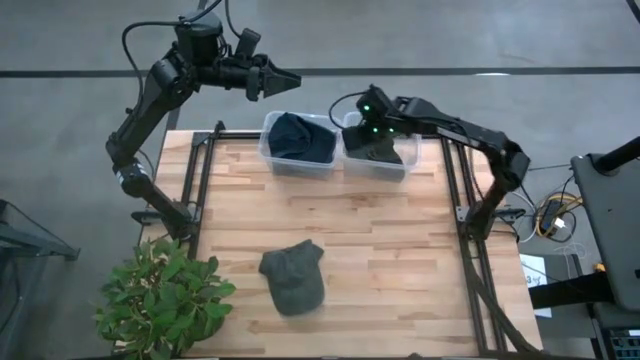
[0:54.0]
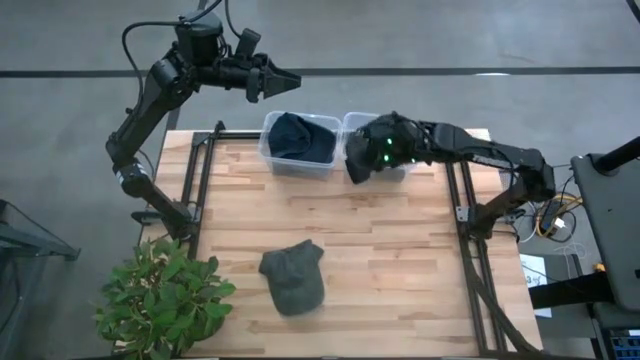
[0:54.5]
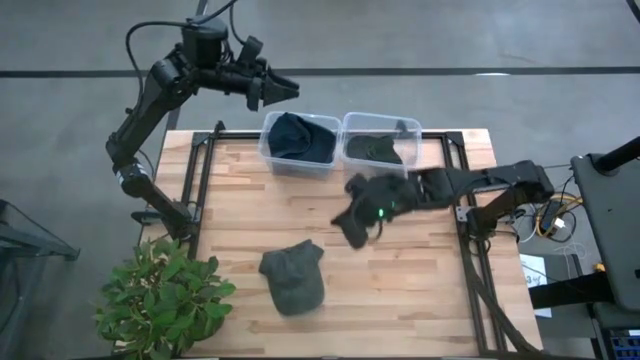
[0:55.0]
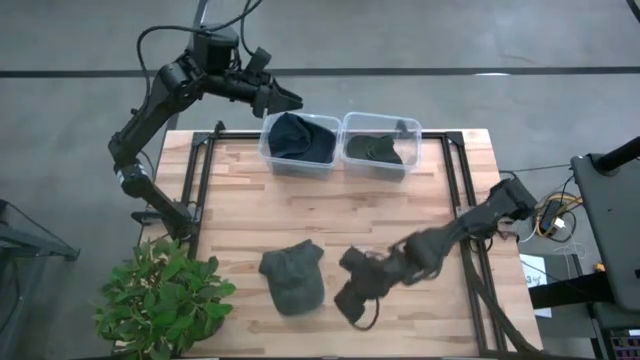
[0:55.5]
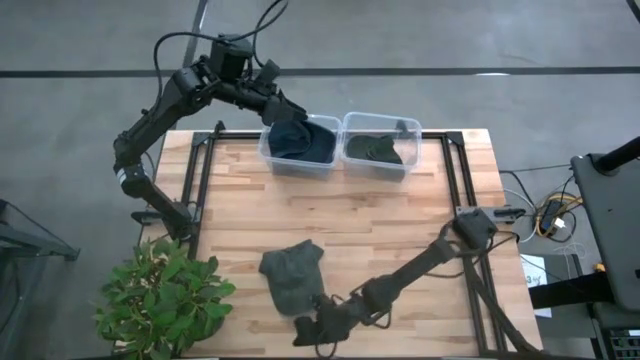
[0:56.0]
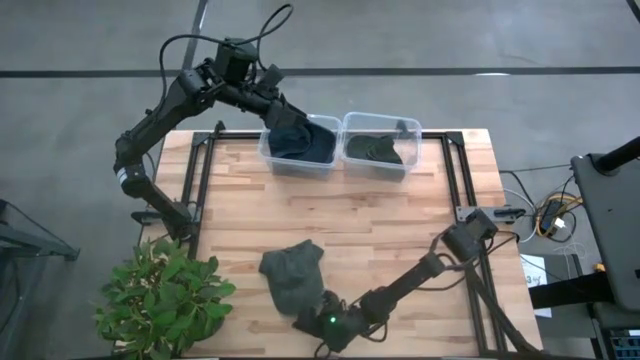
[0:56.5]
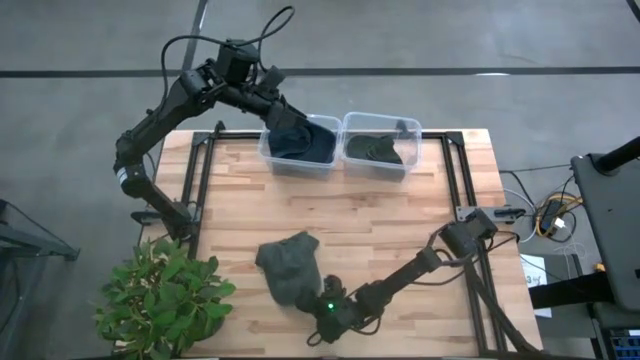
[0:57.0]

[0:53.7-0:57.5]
Task: Pick & Place hat
Put the gray cap into the right transparent bin

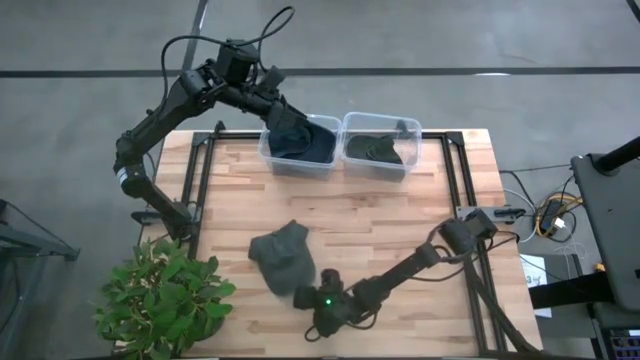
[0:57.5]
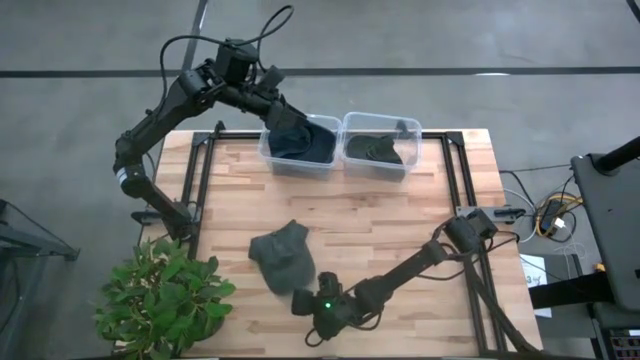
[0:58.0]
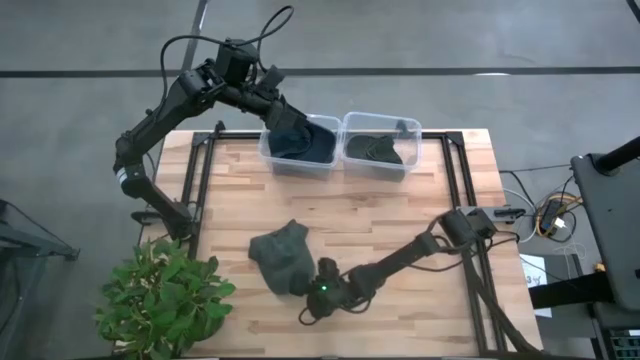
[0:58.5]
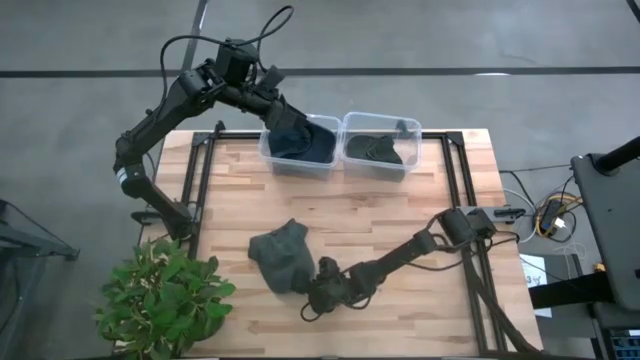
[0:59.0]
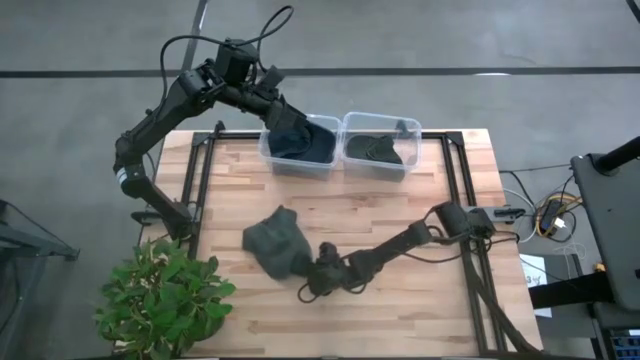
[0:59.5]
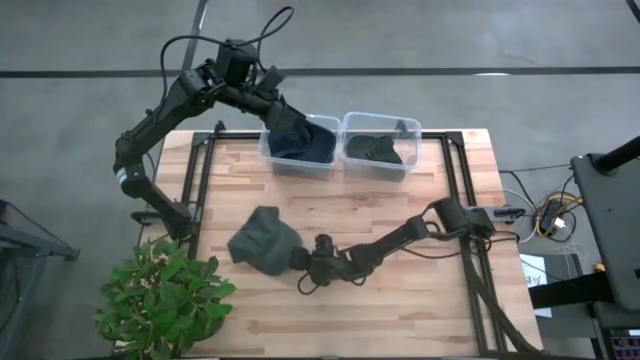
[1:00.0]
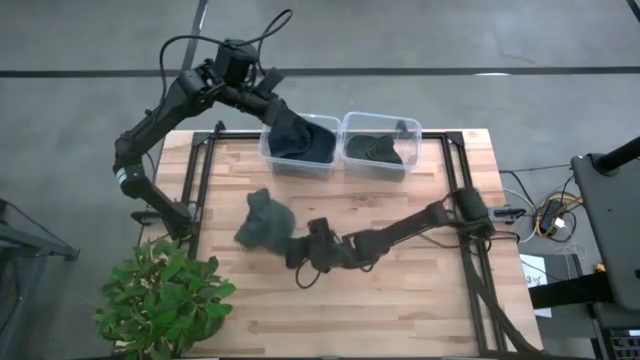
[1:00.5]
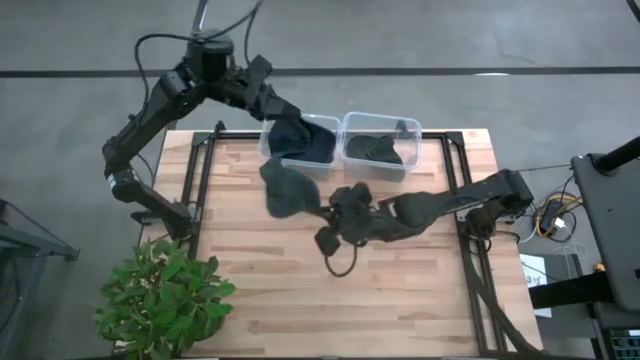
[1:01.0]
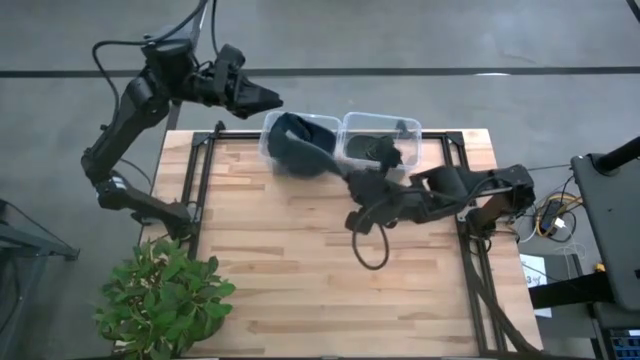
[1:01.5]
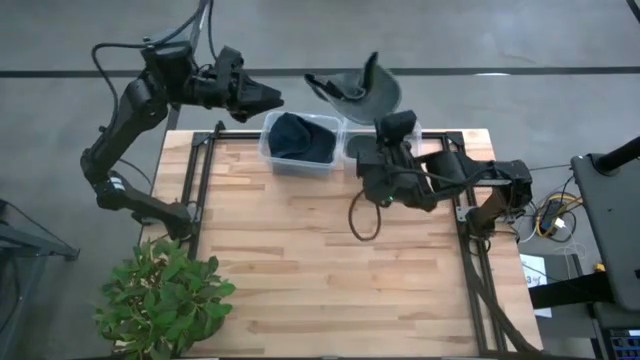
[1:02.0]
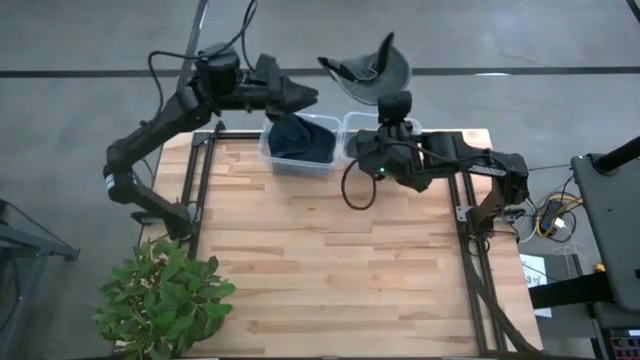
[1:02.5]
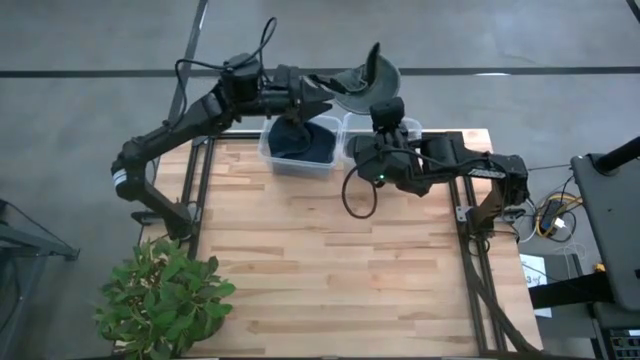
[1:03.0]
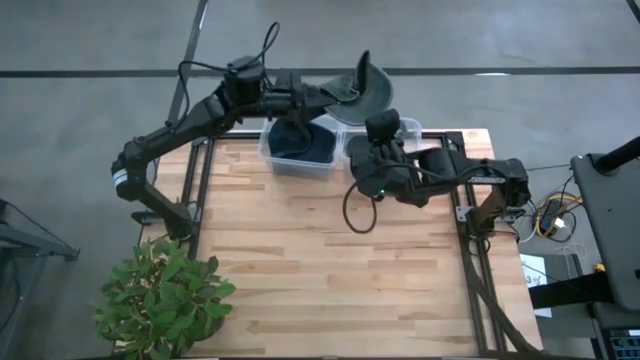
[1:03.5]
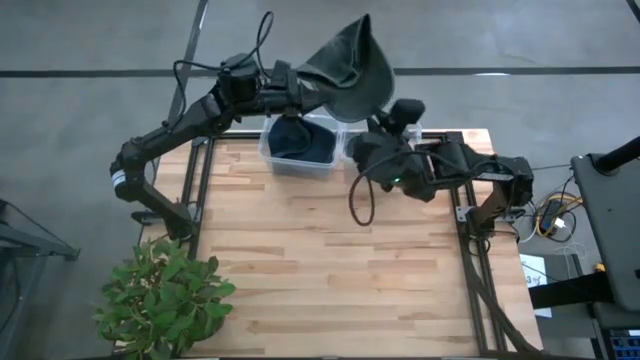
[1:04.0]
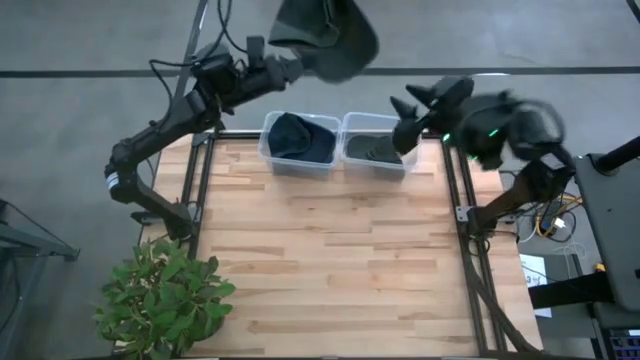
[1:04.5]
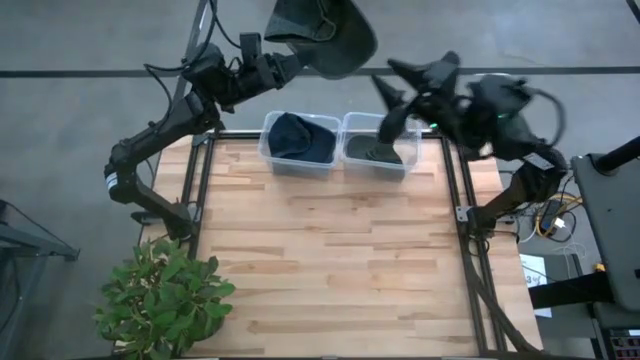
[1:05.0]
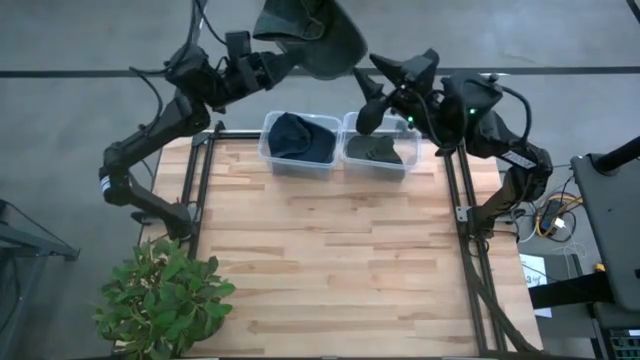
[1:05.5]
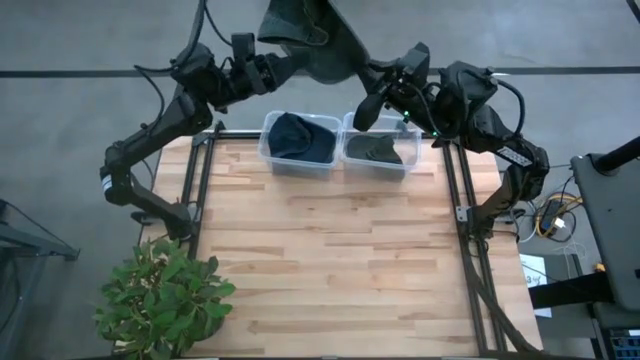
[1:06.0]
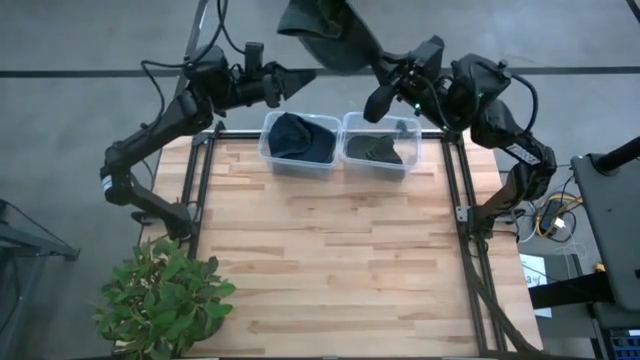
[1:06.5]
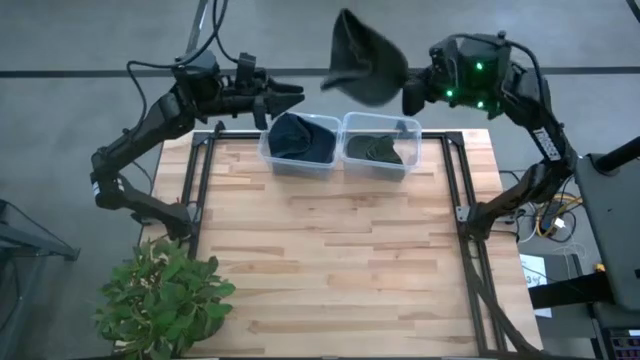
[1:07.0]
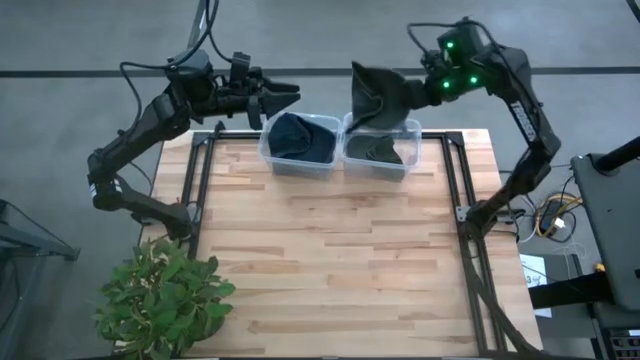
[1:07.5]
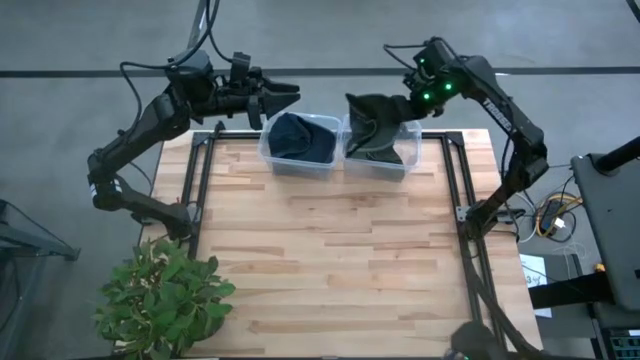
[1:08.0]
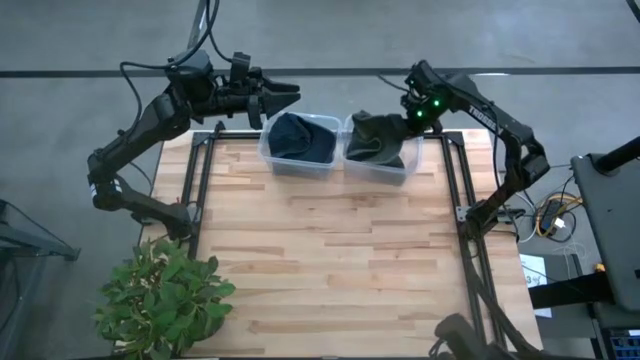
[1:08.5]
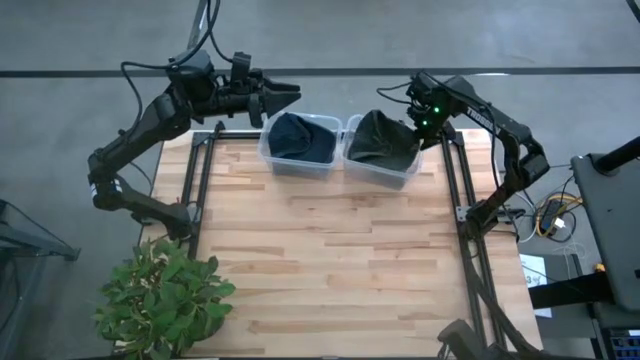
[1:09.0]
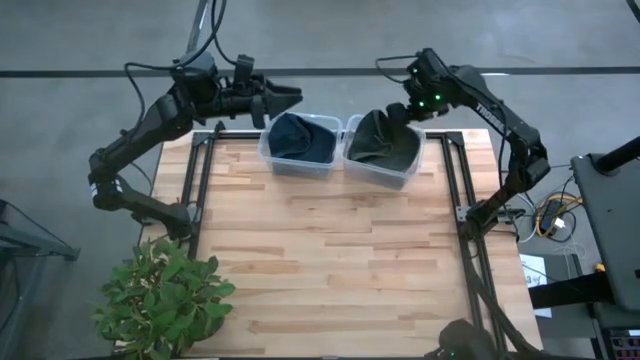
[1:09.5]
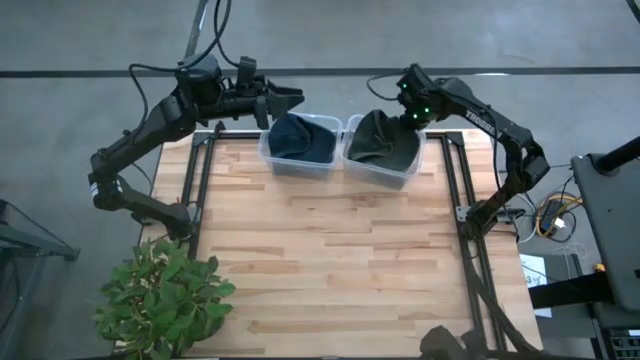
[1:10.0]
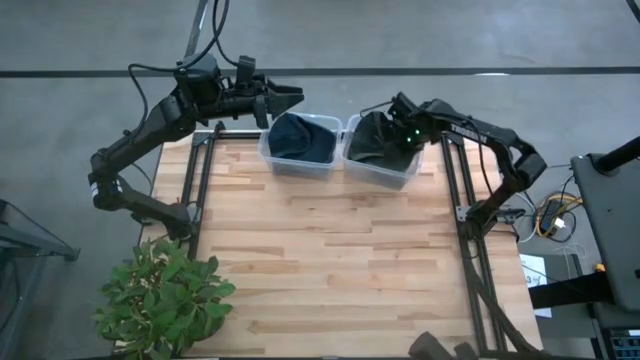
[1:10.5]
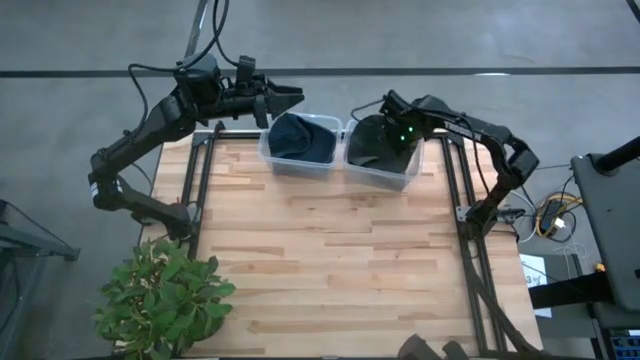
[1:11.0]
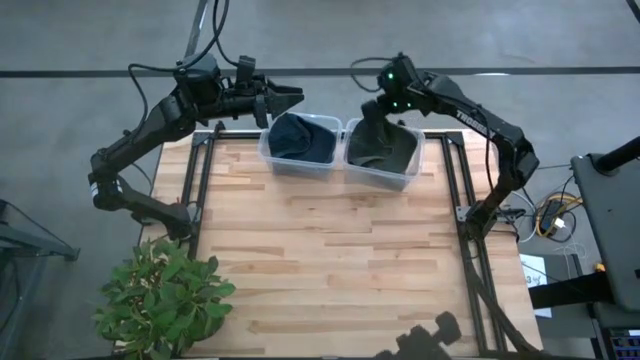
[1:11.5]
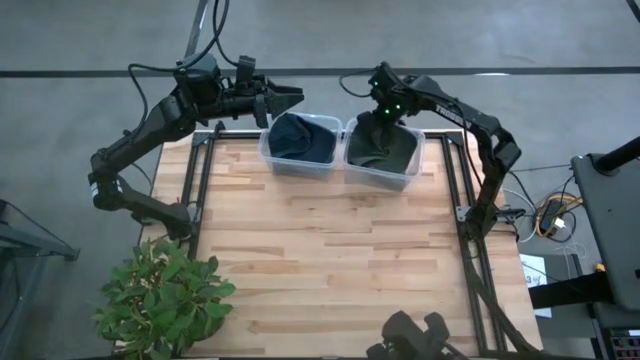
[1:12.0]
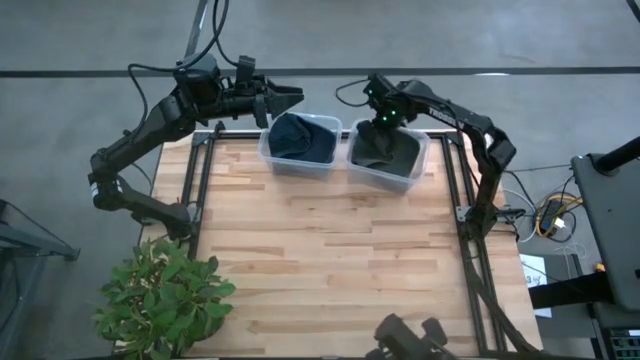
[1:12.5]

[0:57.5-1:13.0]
Put the gray cap into the right transparent bin

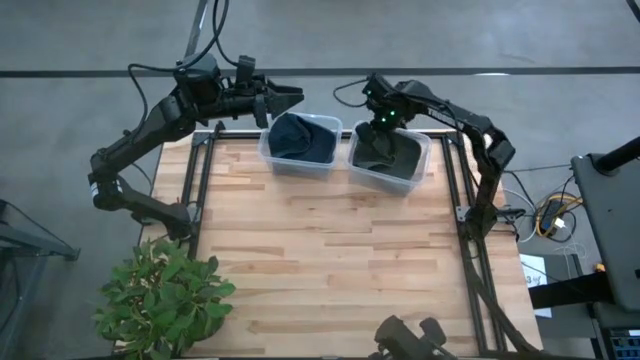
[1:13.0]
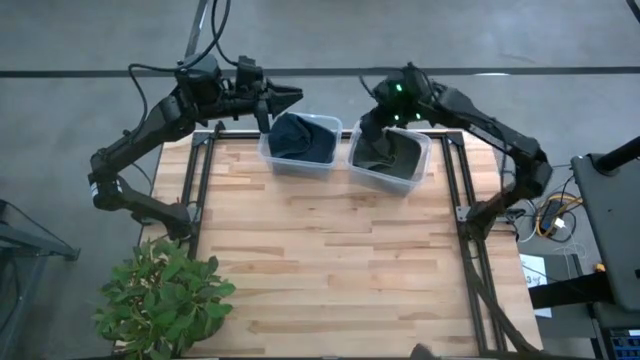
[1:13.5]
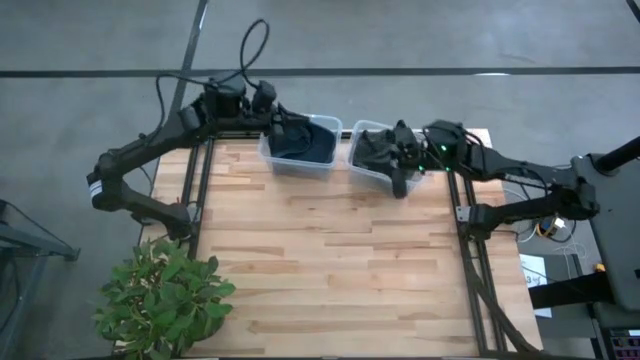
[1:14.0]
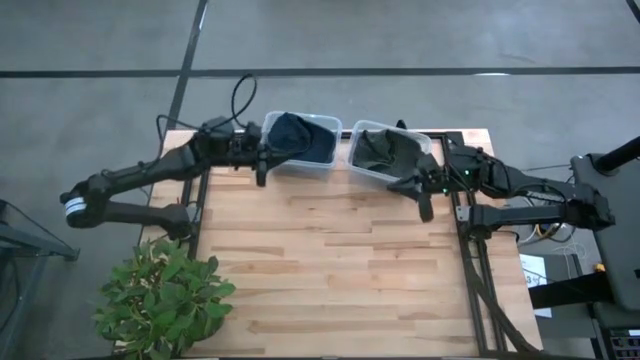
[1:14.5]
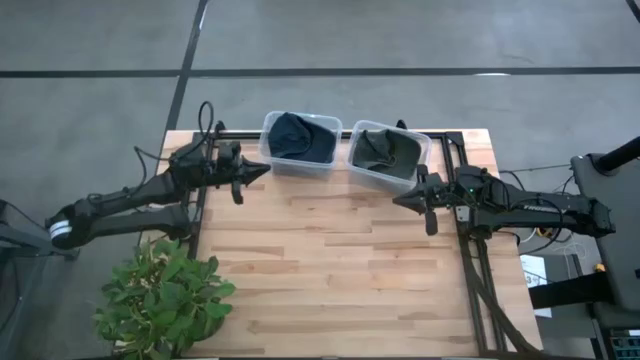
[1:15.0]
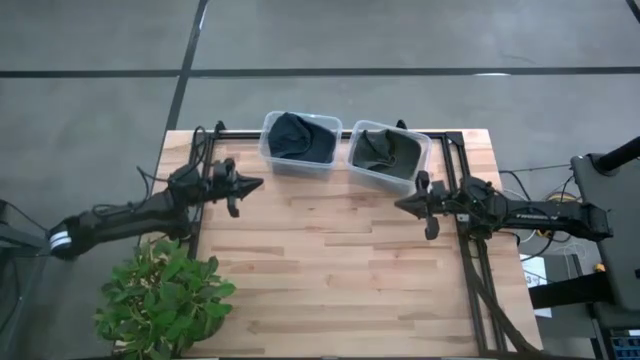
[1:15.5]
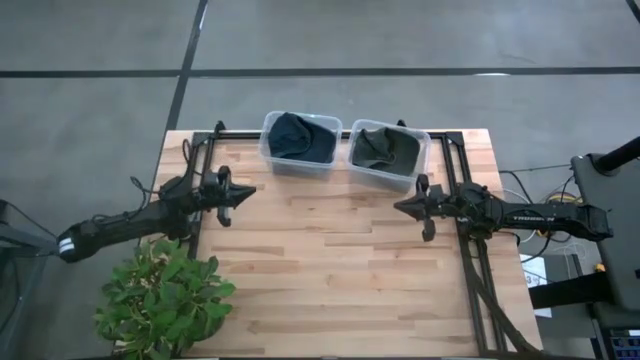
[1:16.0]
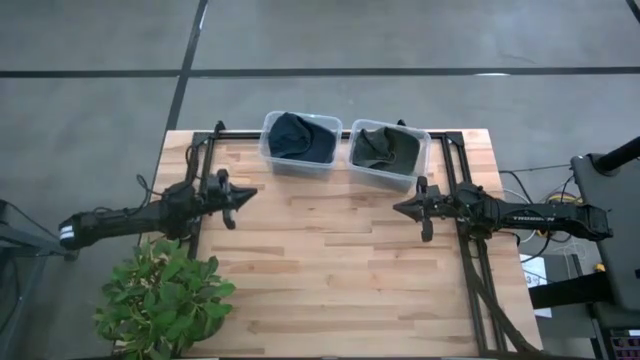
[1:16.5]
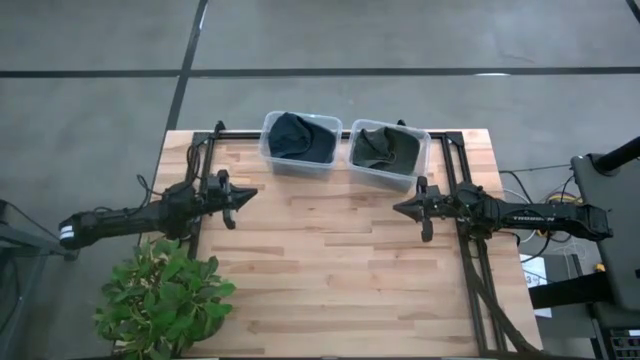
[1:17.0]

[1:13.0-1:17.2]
Return to Home Position
